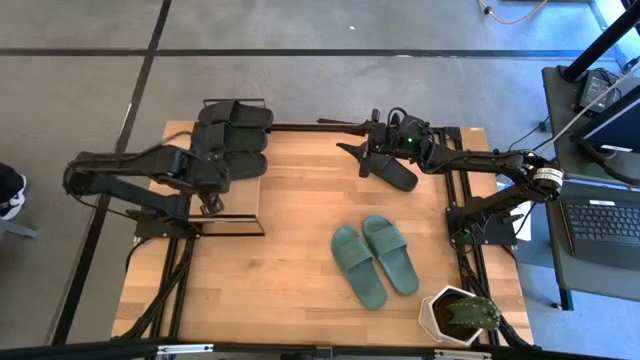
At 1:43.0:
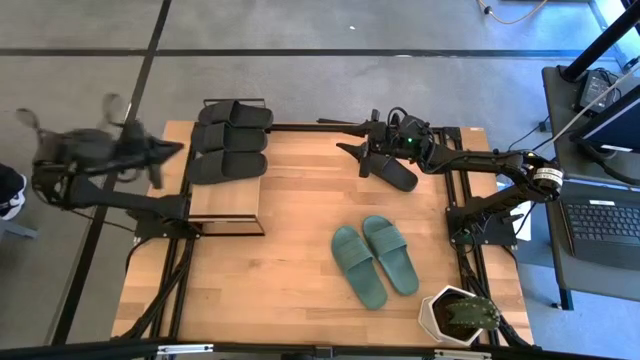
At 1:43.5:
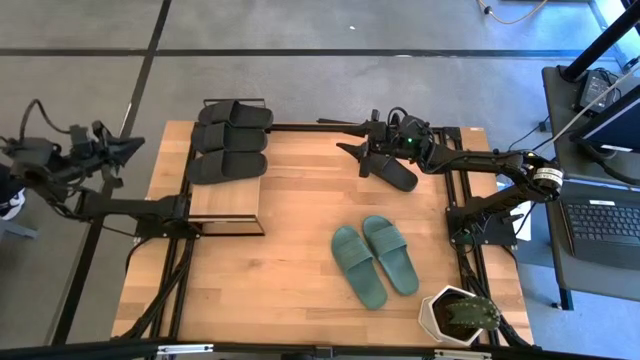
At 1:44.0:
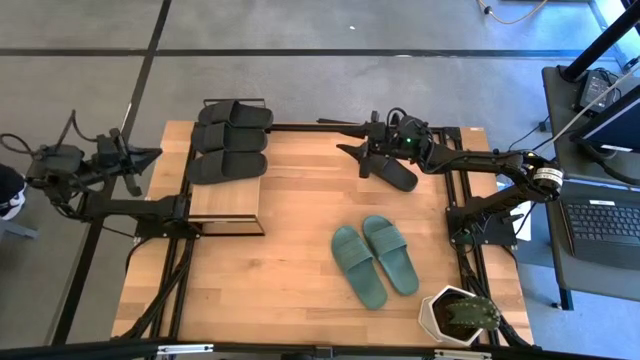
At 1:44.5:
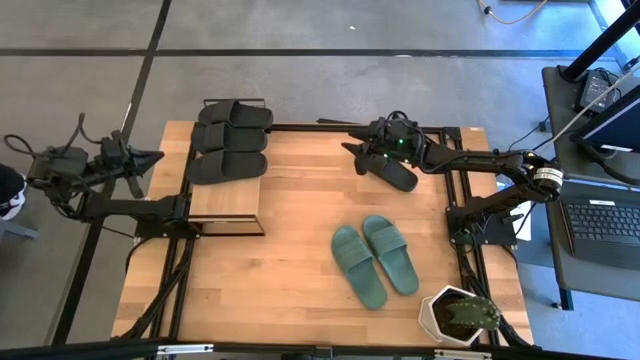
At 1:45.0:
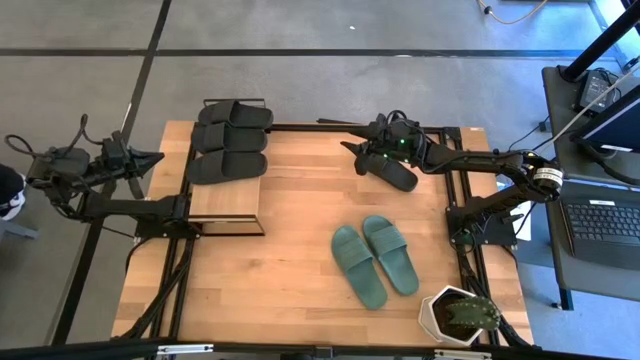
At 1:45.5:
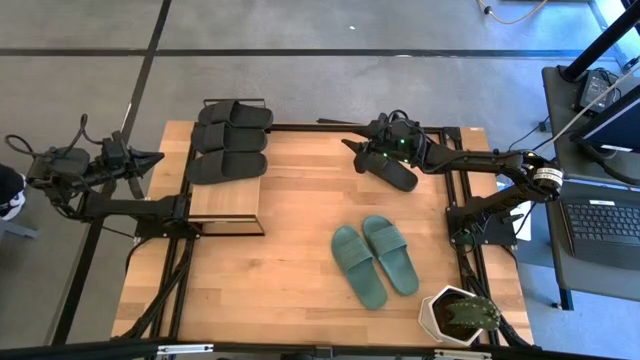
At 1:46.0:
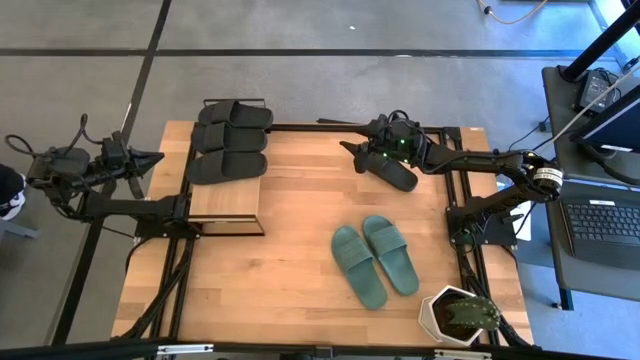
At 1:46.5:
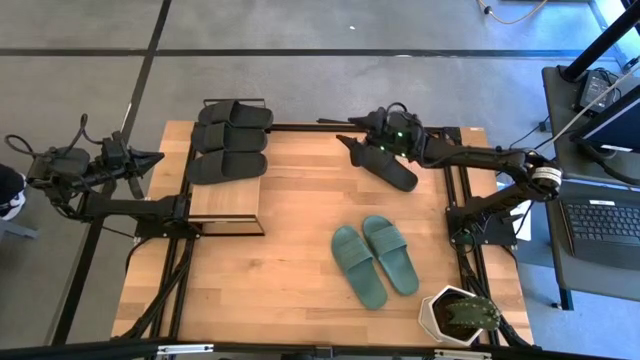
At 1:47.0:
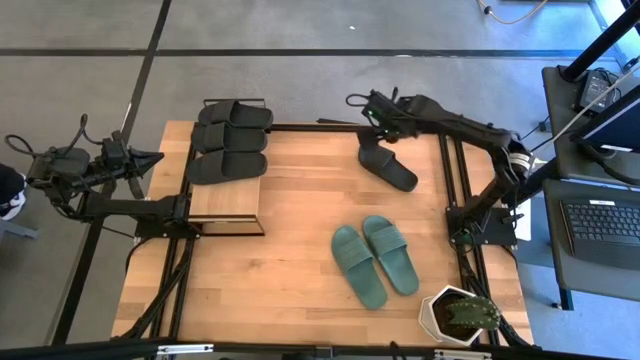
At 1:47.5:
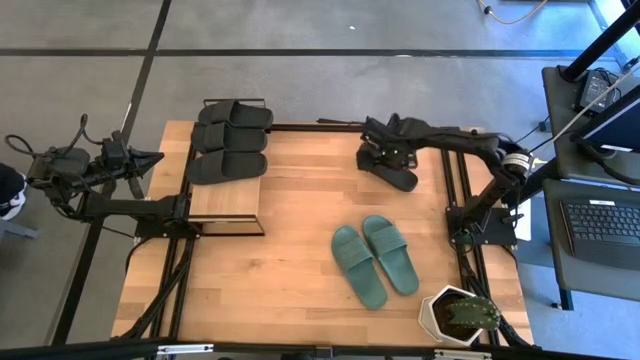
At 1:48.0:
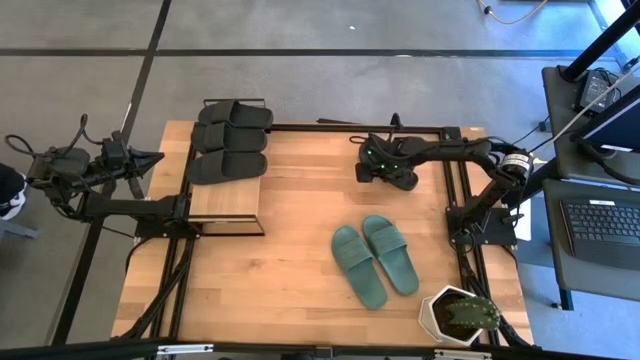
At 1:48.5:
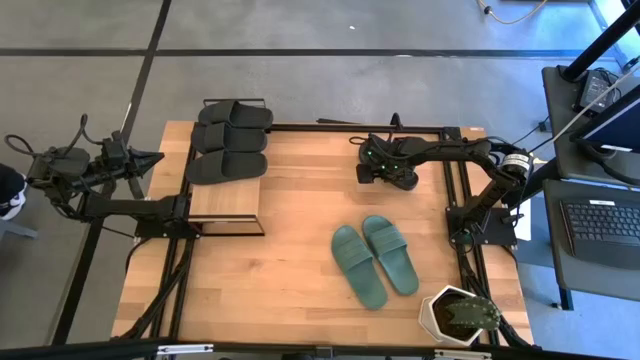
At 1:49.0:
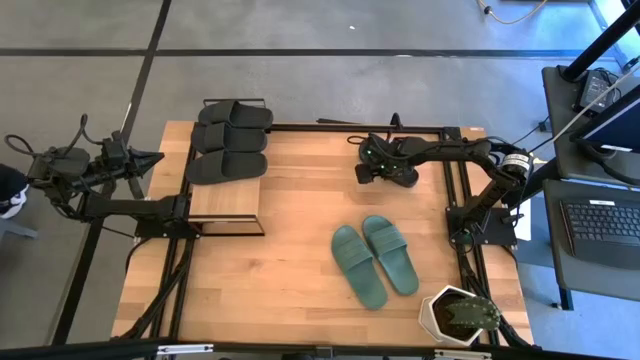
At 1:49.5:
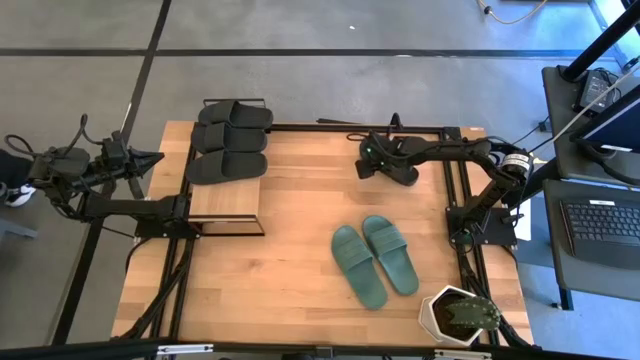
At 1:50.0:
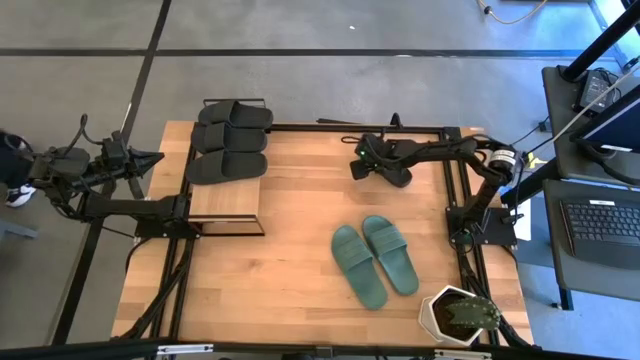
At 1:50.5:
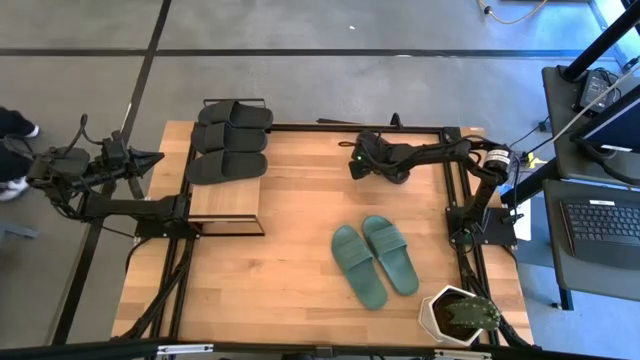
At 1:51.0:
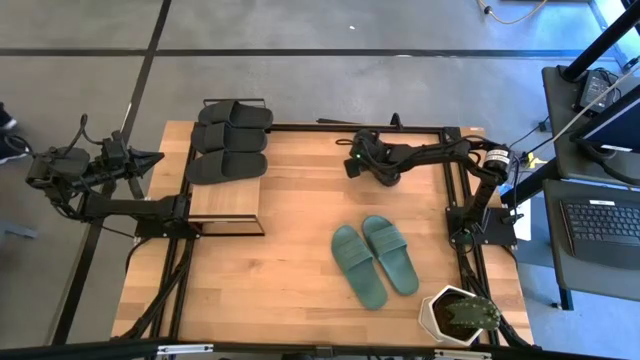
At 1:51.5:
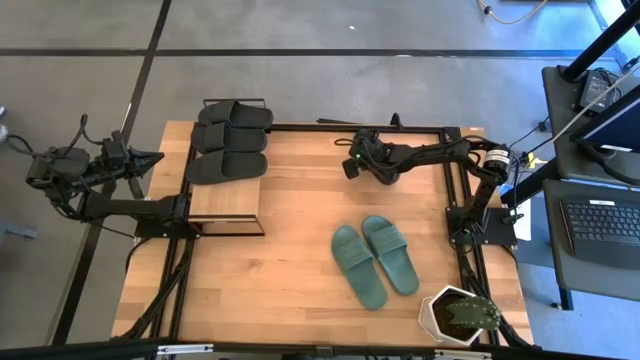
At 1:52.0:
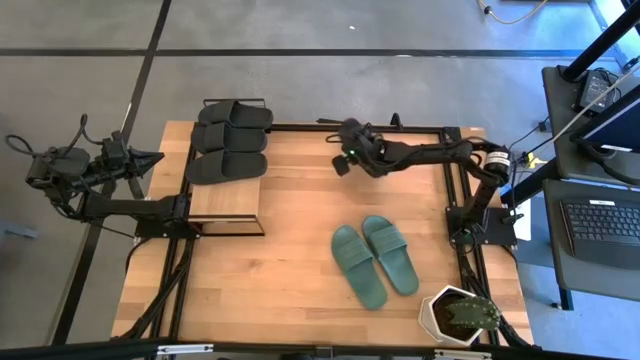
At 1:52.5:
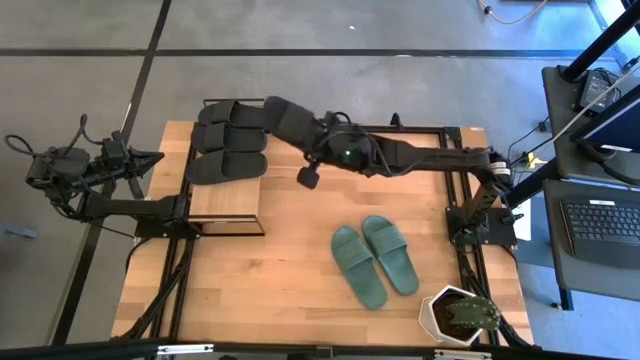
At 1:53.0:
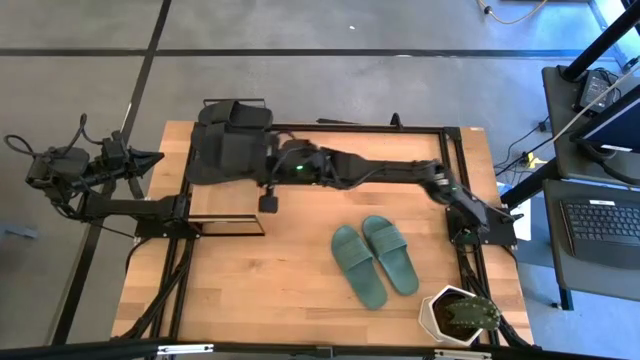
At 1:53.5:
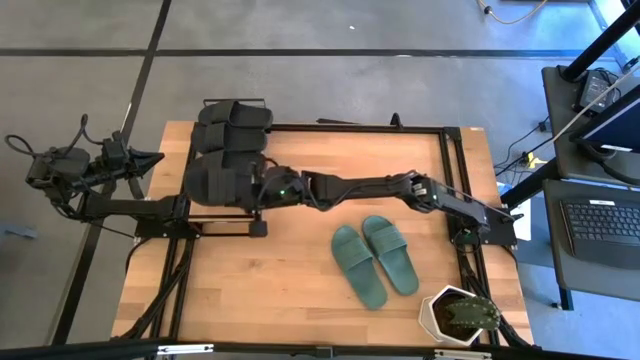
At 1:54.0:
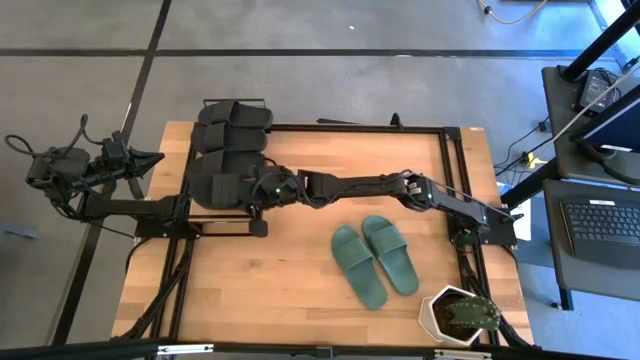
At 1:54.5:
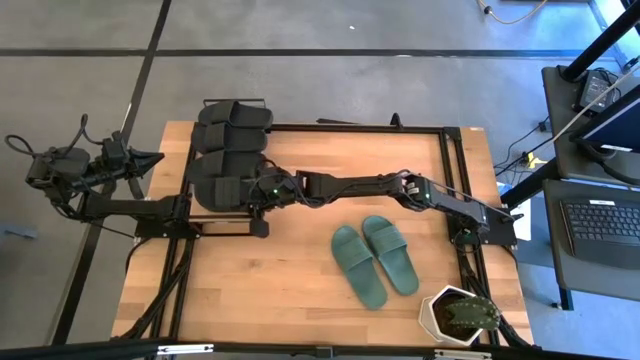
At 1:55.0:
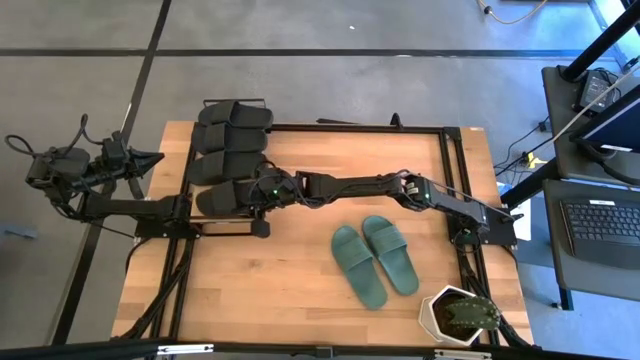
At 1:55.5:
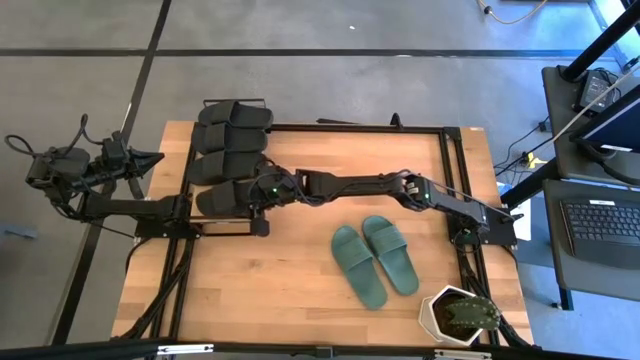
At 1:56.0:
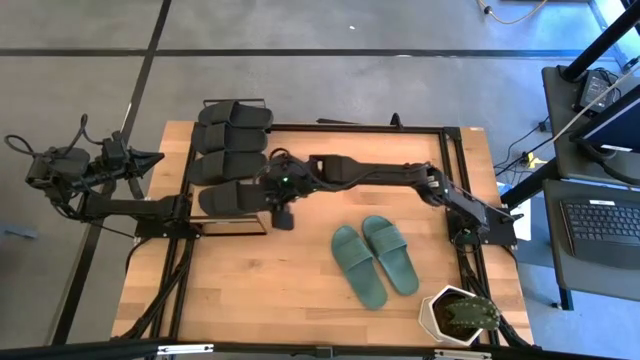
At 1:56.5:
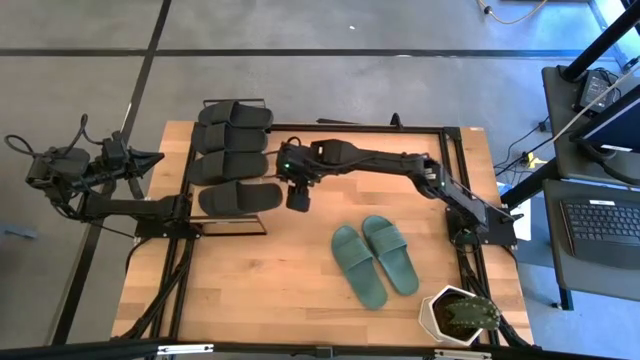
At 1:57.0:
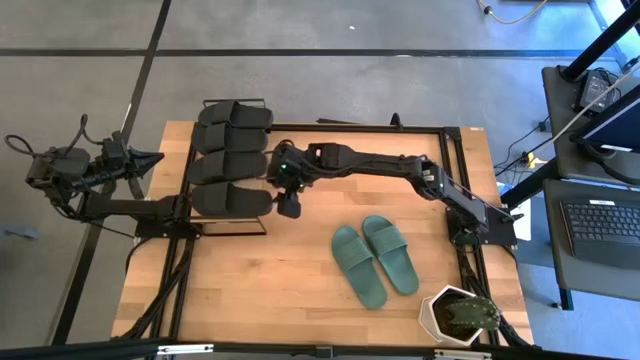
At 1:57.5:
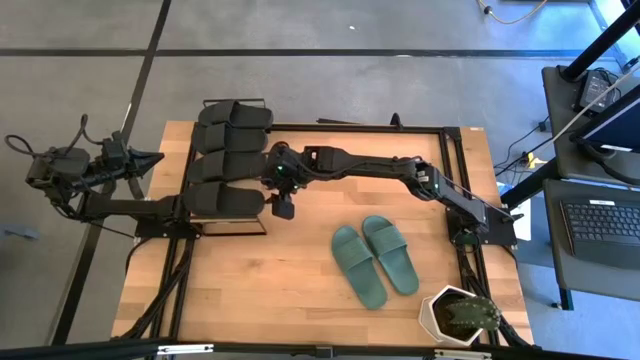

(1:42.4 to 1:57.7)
Task: Pick and place slides into the shelf
Put the black slipper on the shelf

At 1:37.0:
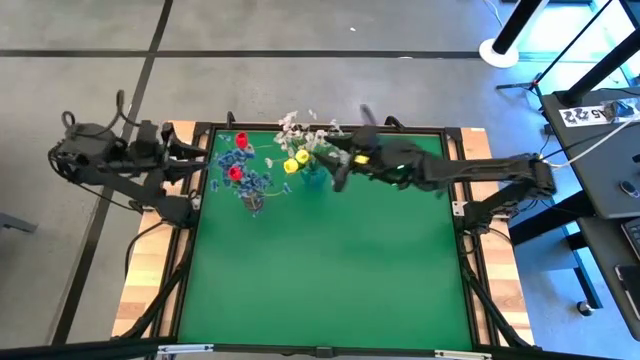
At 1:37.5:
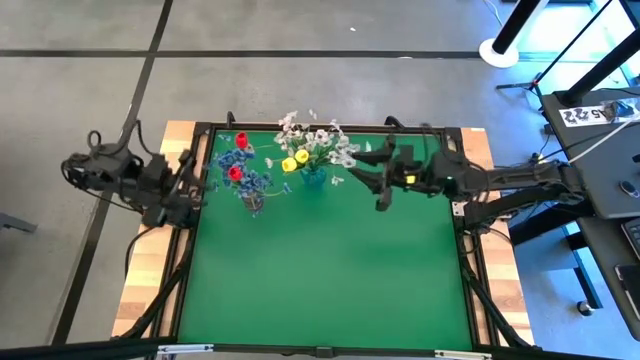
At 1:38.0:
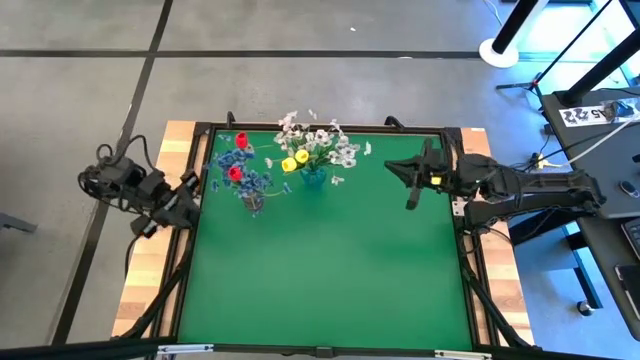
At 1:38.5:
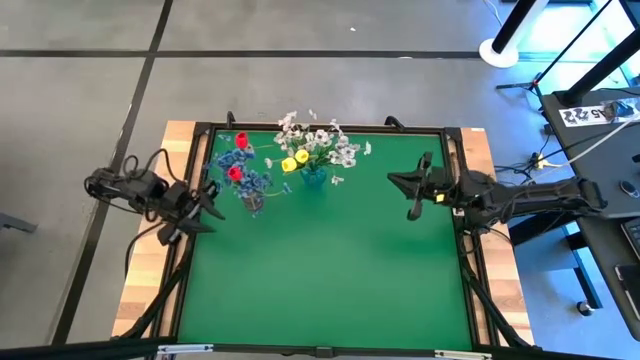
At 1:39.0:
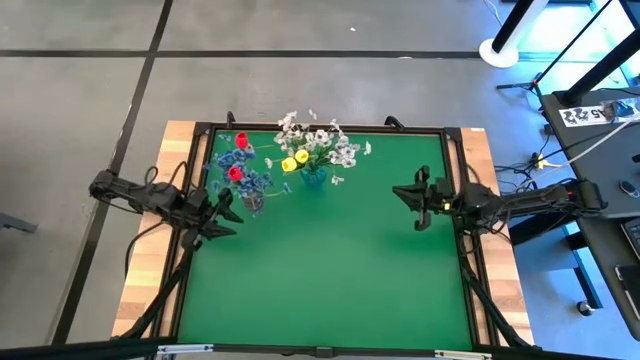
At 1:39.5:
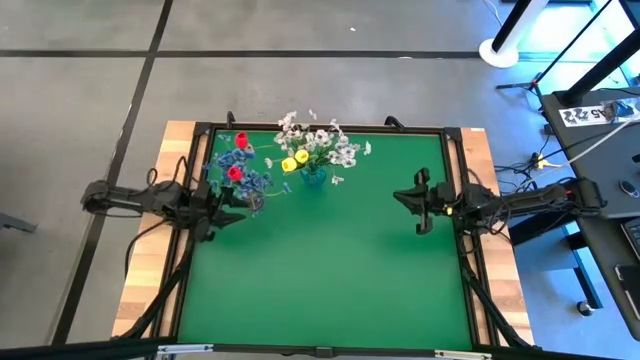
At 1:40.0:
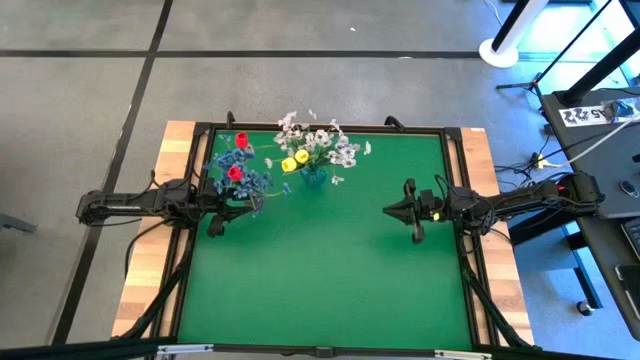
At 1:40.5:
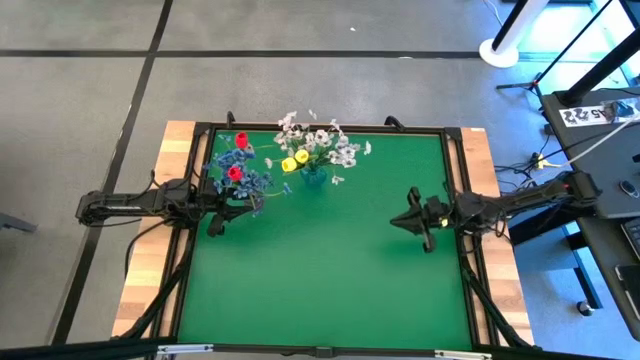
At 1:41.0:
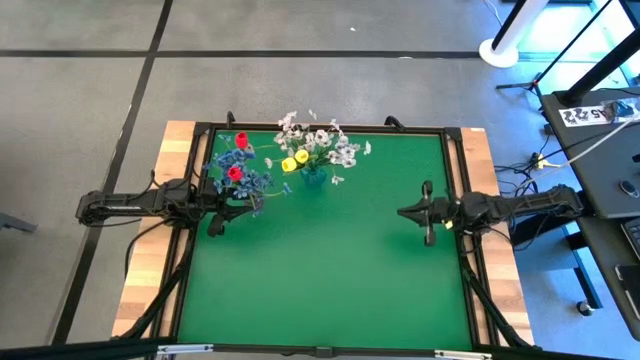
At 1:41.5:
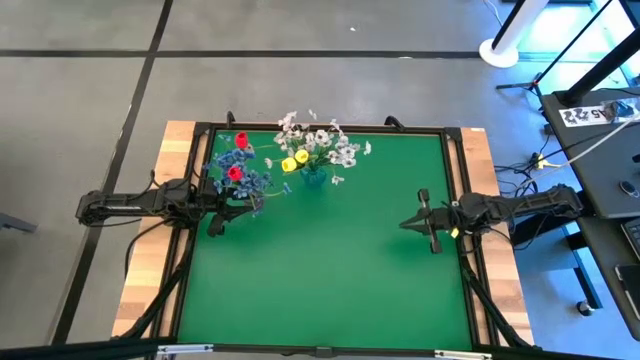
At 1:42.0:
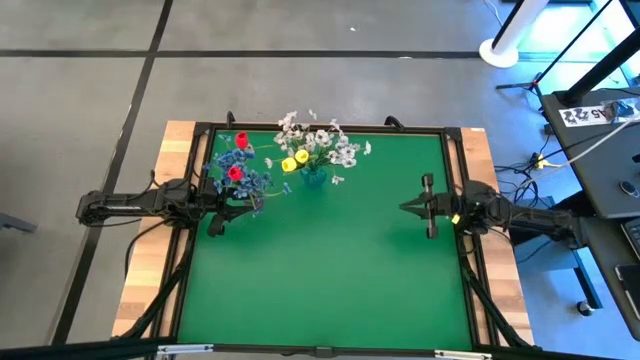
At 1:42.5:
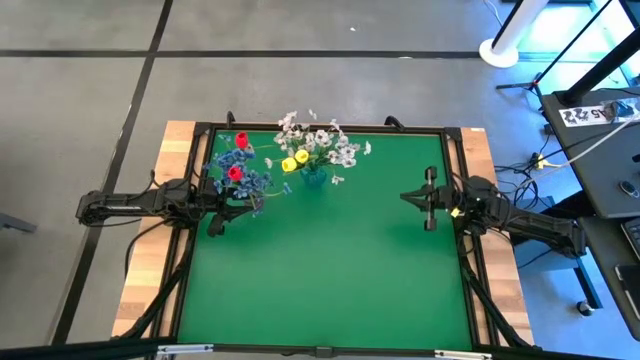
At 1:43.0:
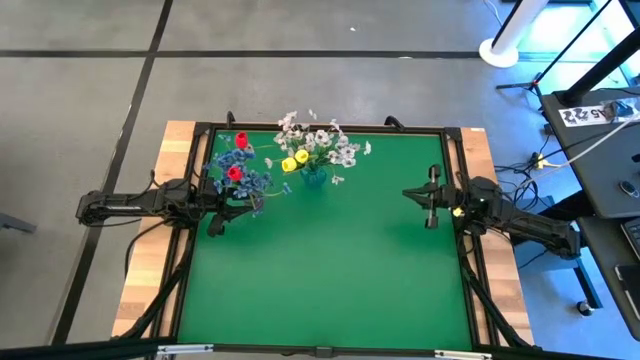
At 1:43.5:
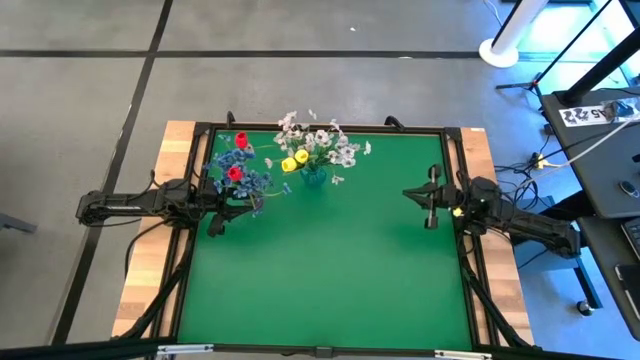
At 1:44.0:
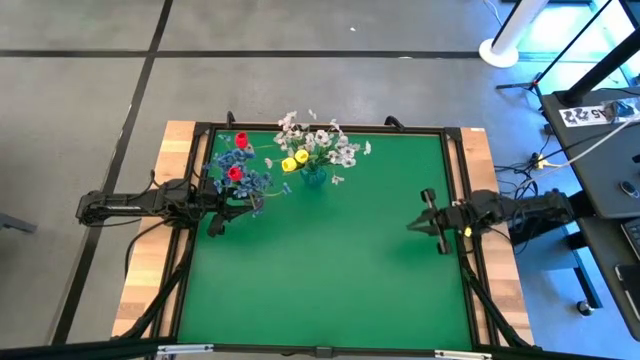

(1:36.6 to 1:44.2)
Task: Sort flowers into vase by color
Return to Home Position
